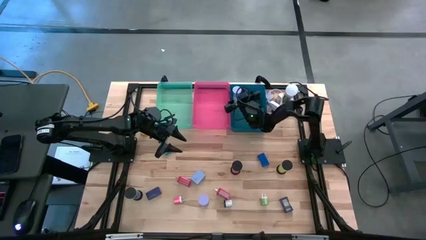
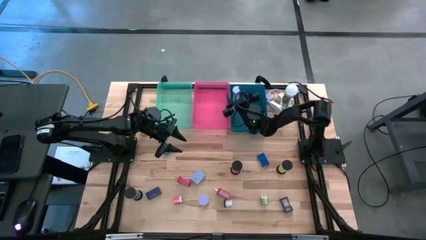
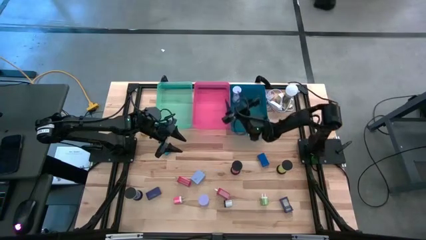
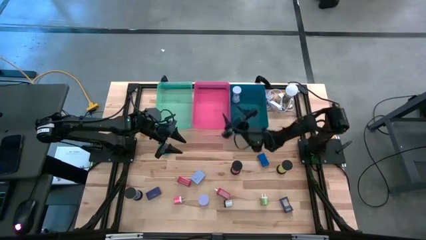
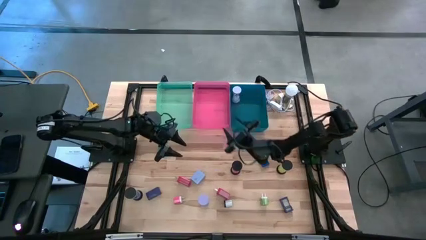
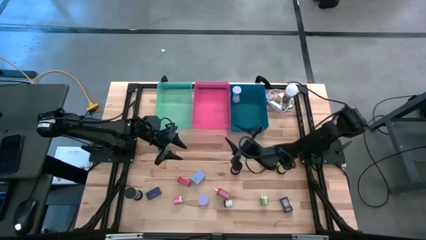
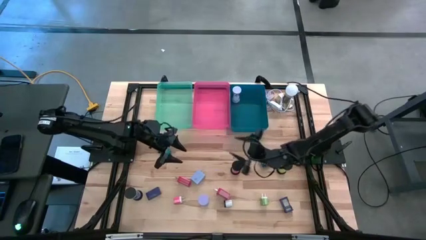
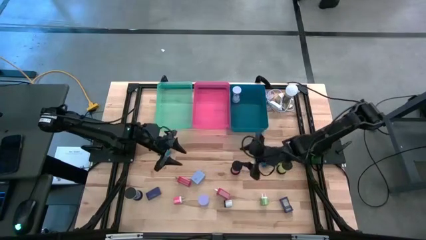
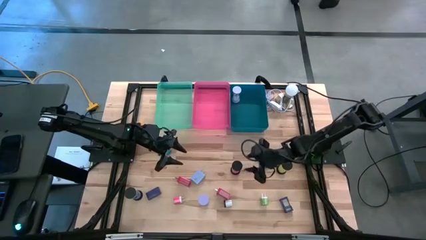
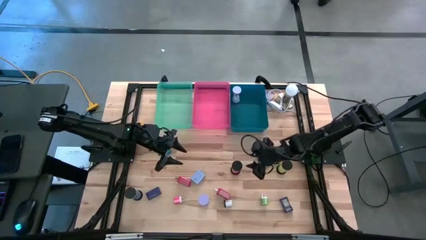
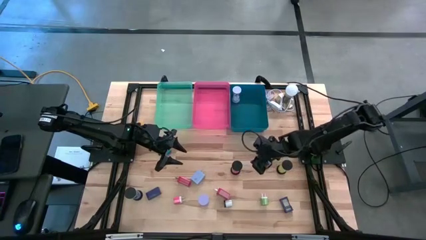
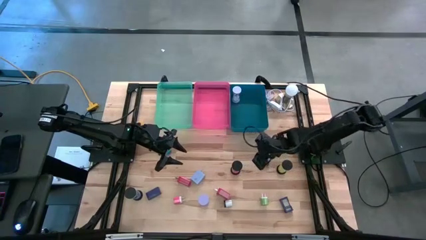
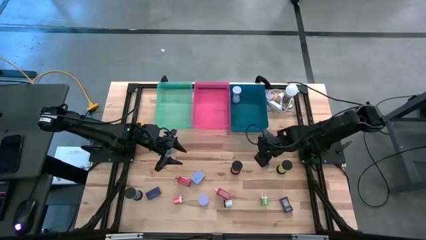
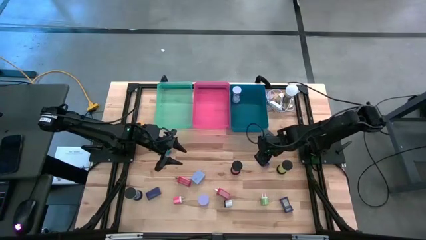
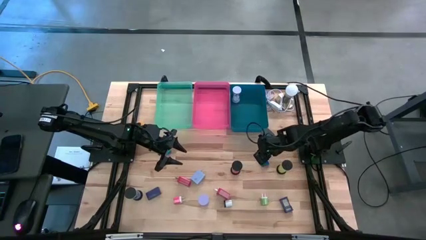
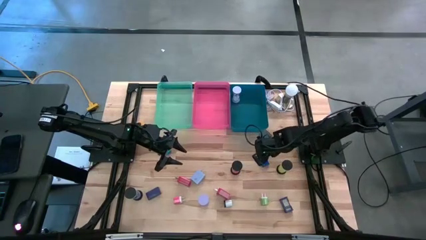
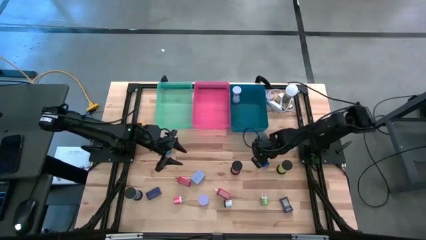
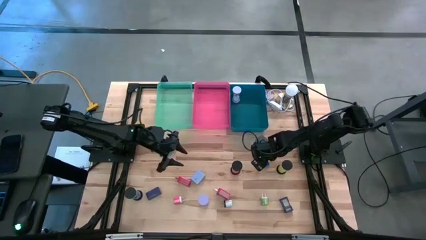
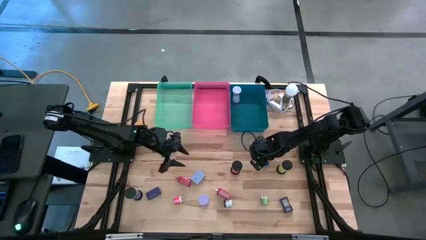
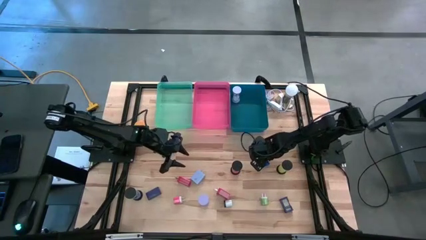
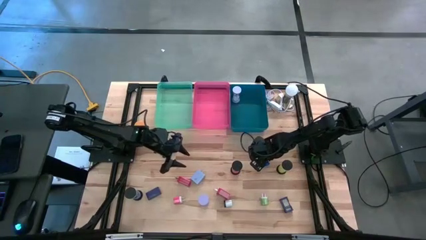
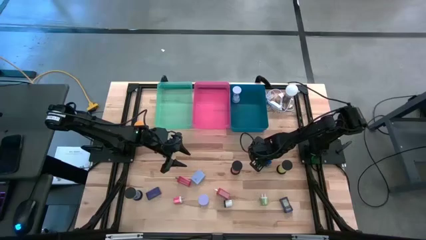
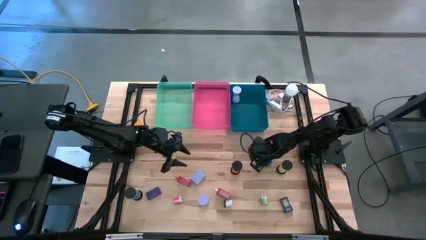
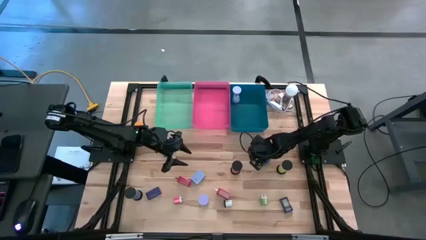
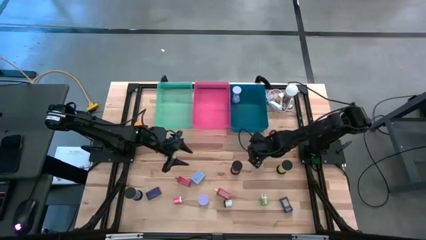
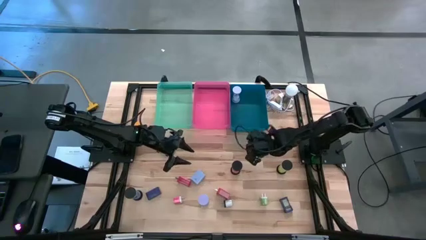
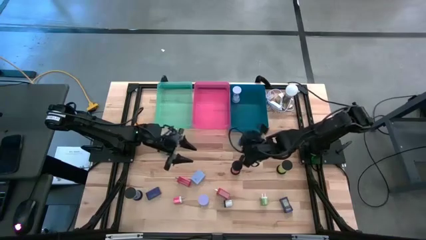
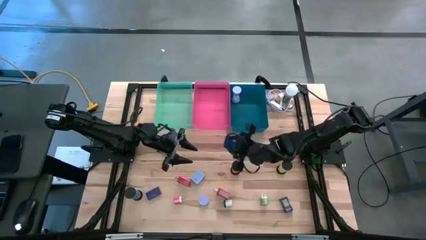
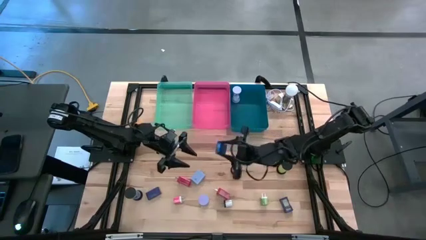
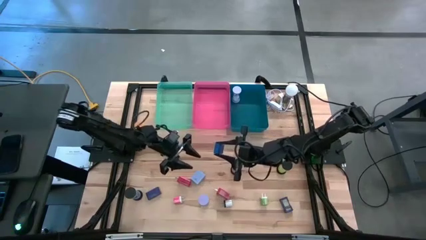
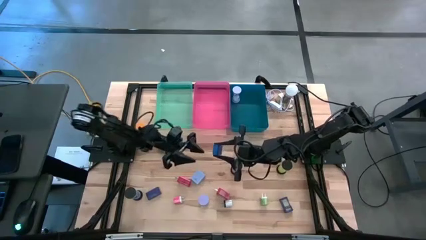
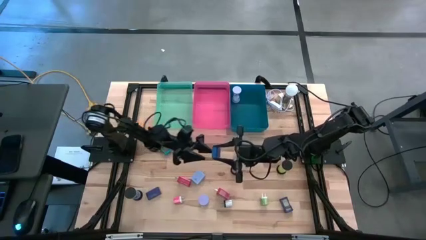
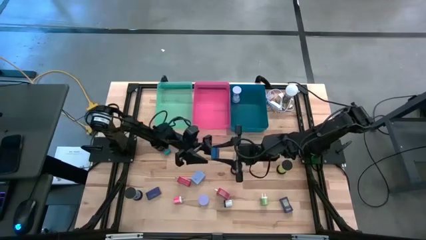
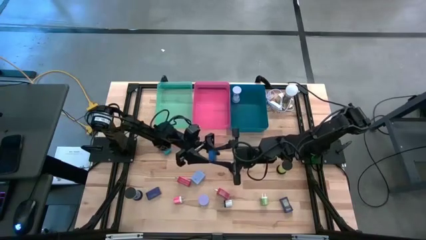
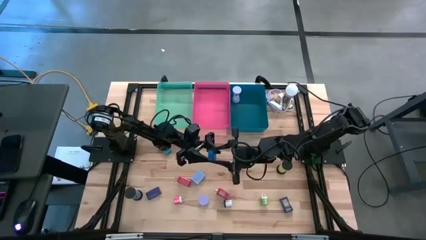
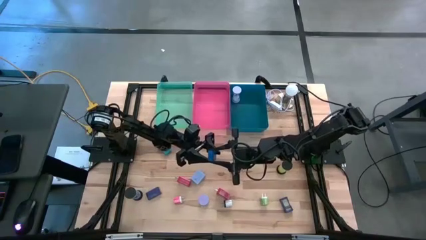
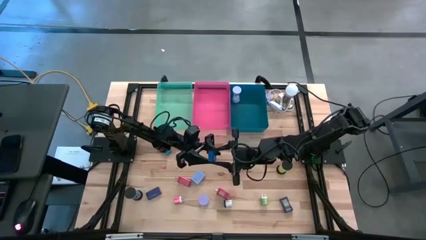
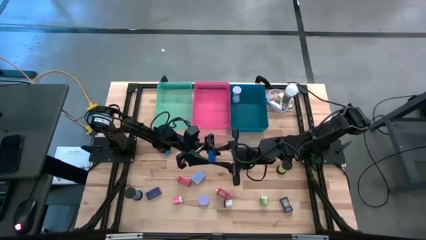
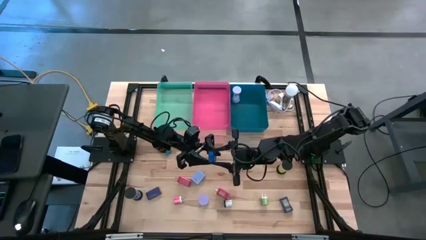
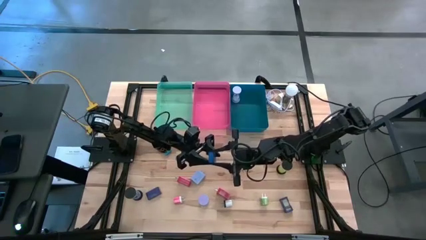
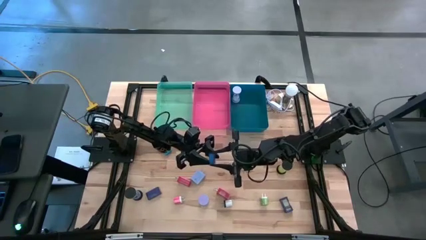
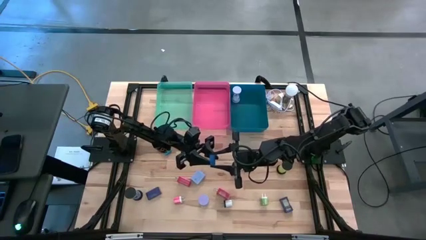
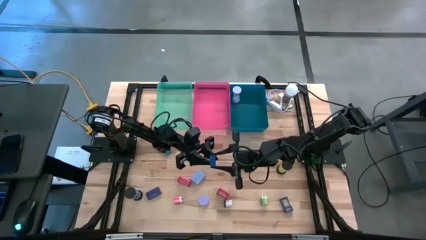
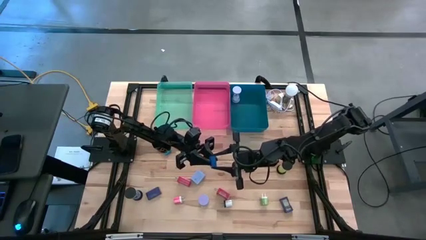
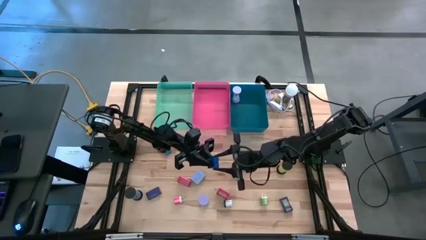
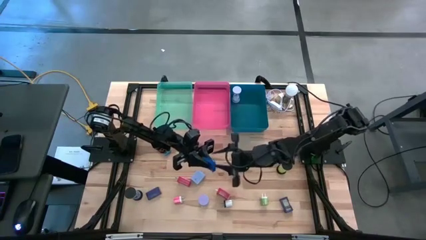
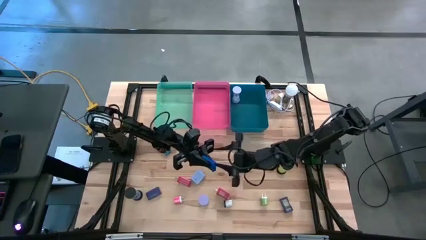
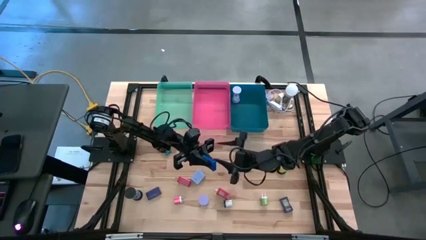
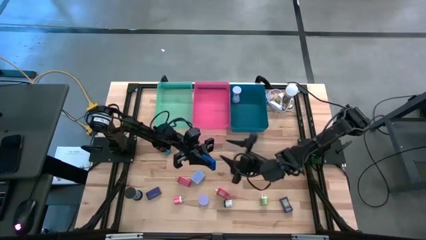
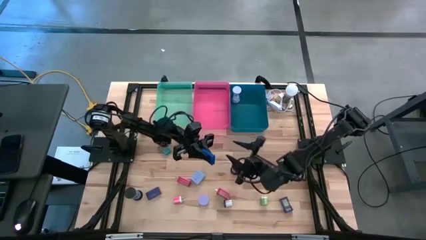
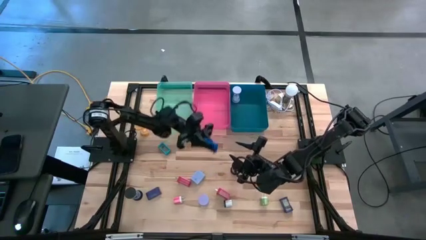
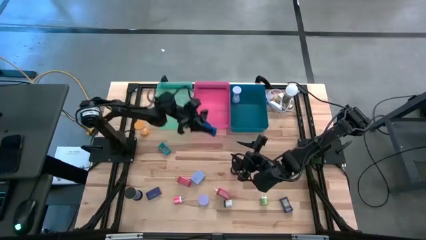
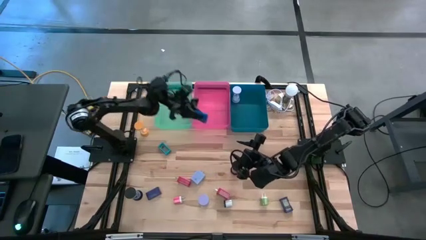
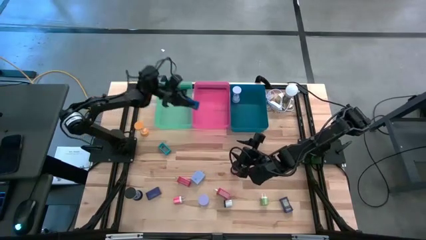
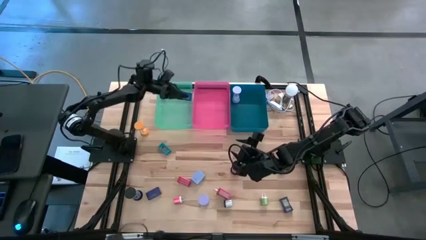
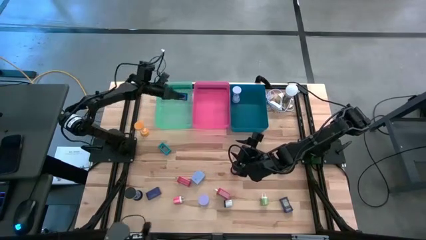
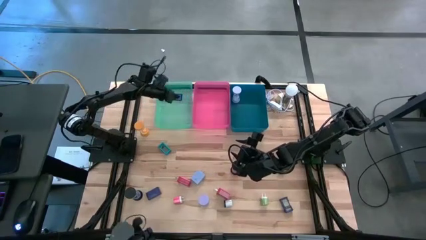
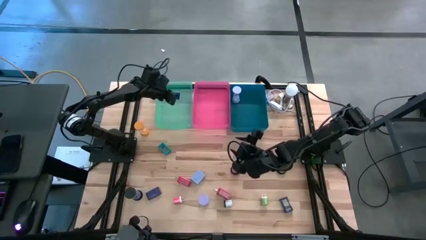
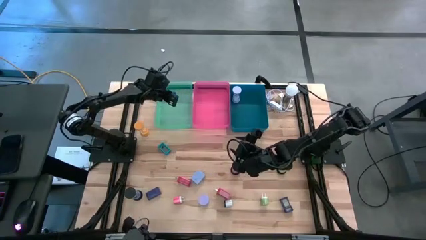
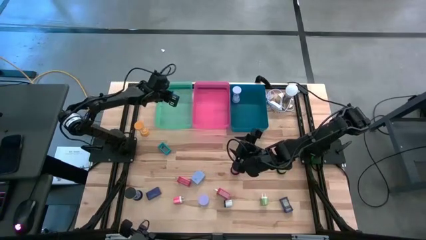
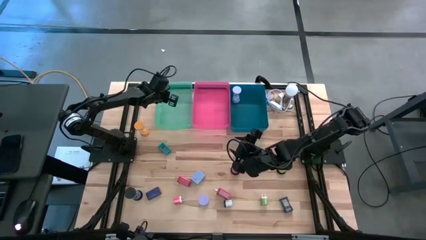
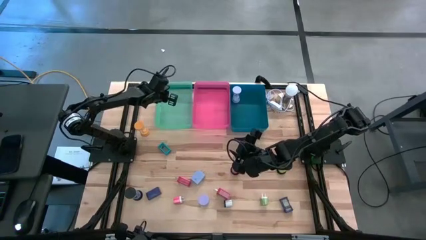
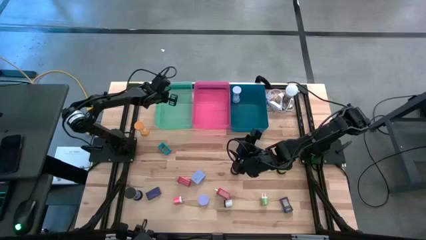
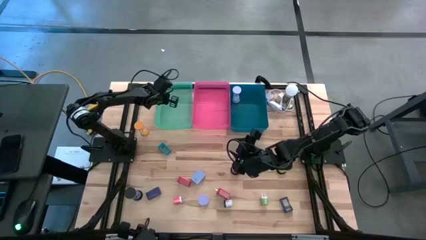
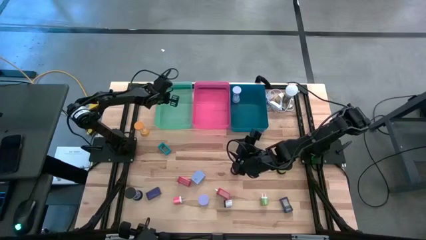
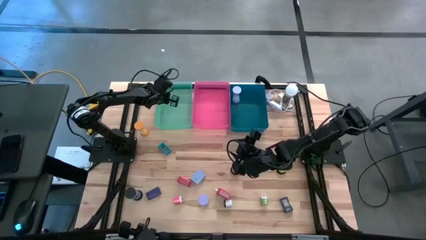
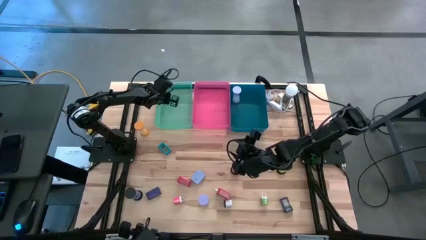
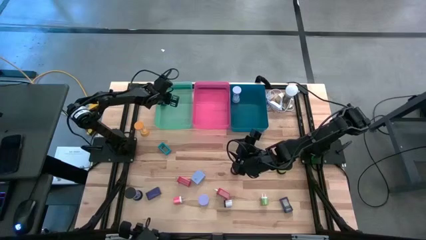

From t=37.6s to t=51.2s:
Task: Pick & Place Office items
Put the blue digital clock into the light blue bin

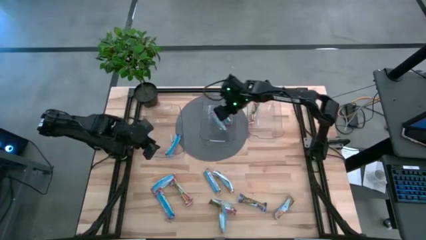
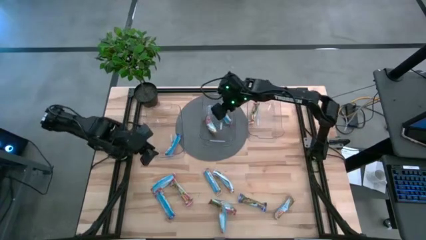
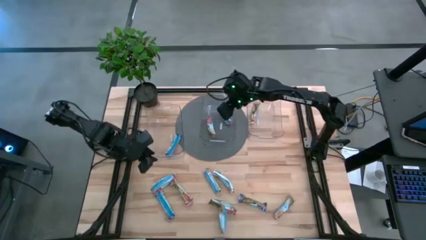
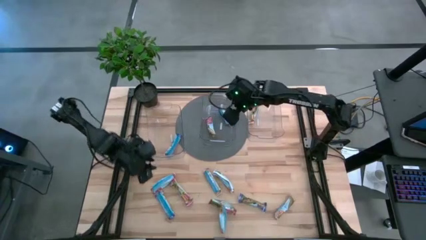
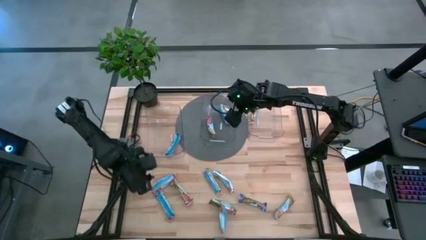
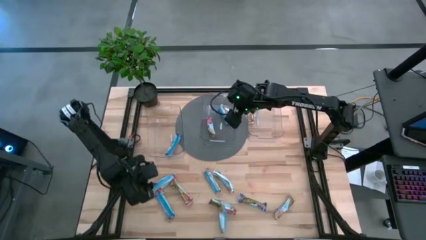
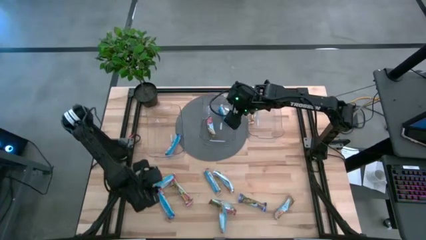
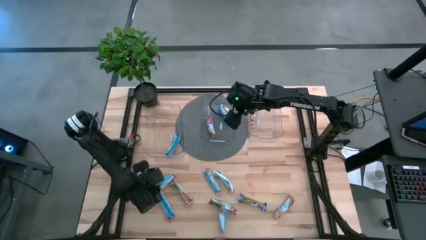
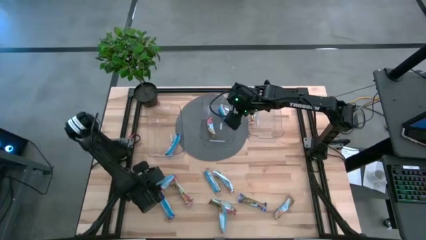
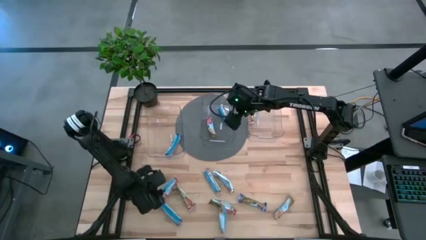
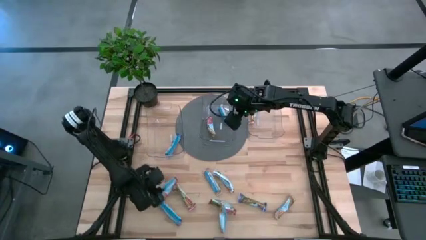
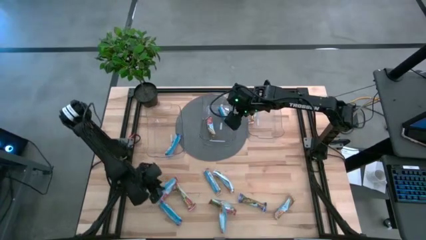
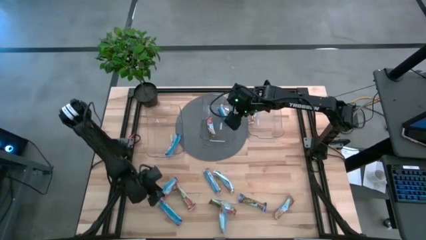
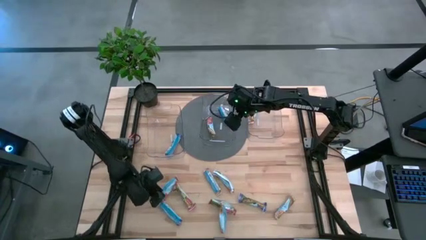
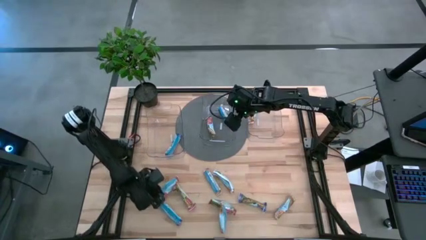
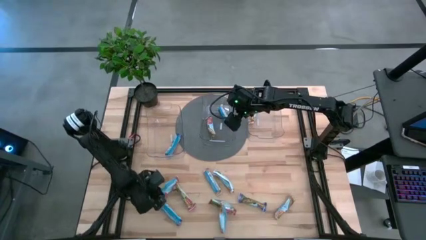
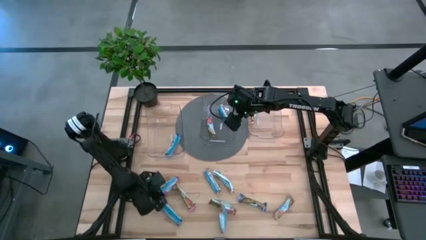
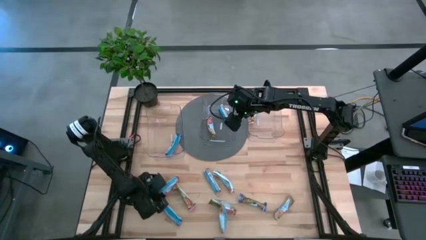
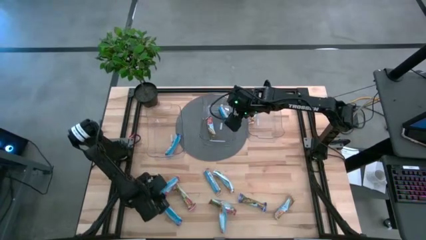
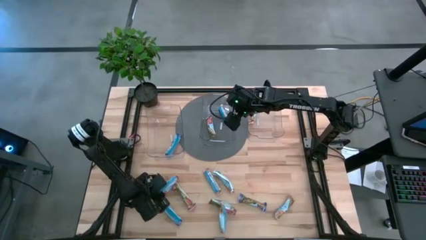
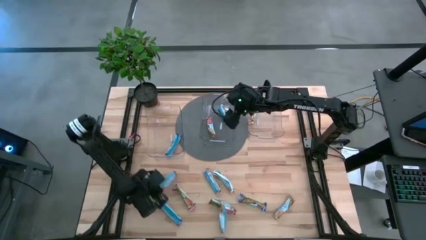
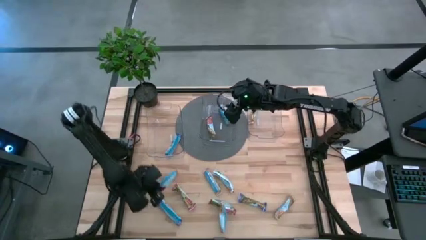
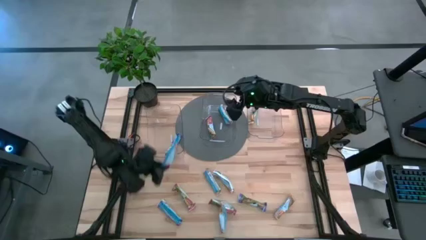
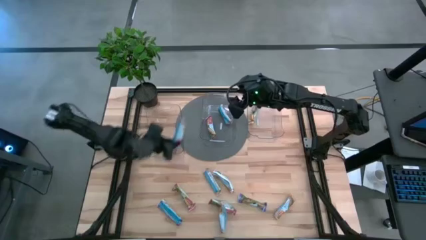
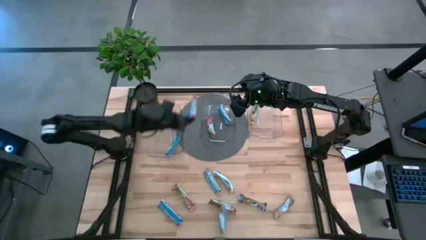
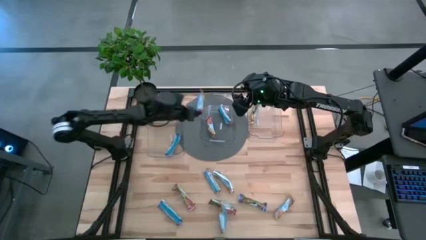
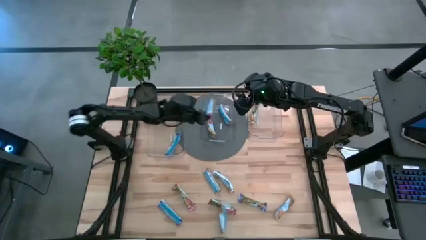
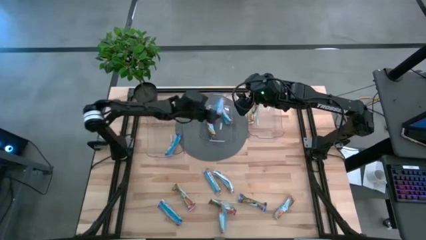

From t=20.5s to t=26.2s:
Task: Pick and place Granola Bars by type
Put the red granola bar into the middle transparent bin
